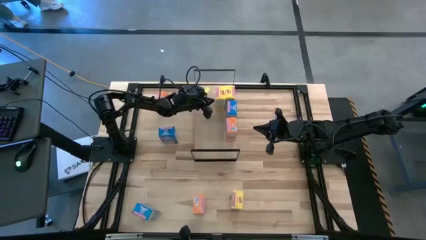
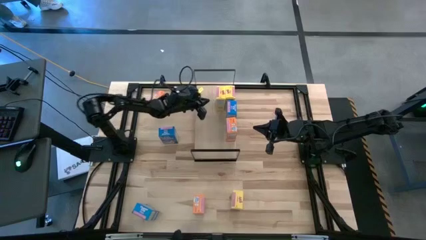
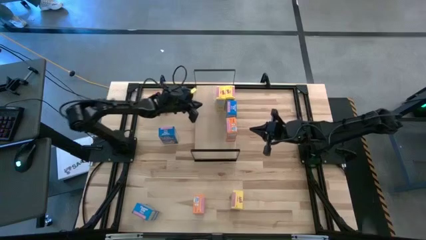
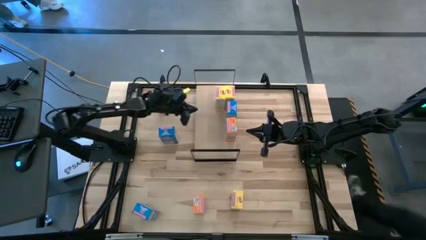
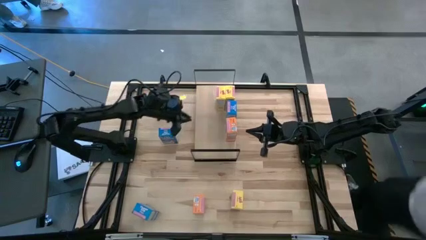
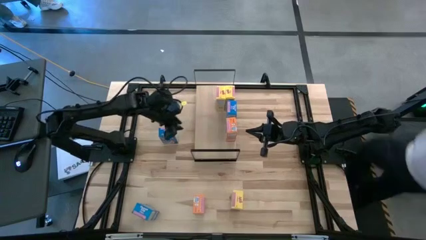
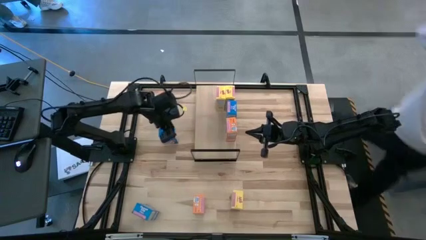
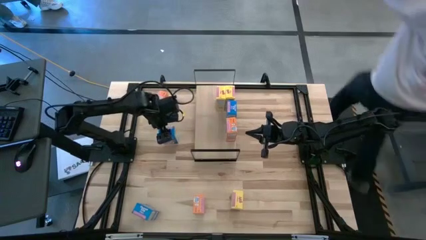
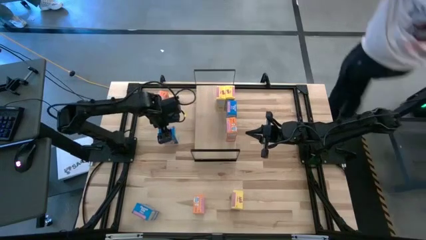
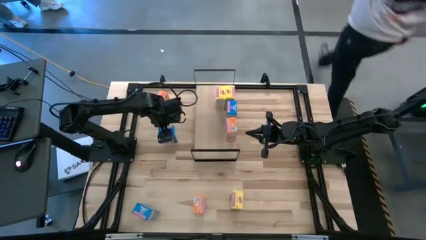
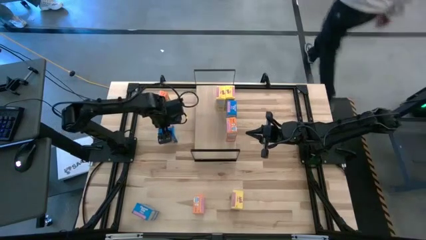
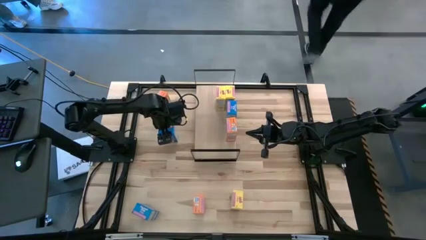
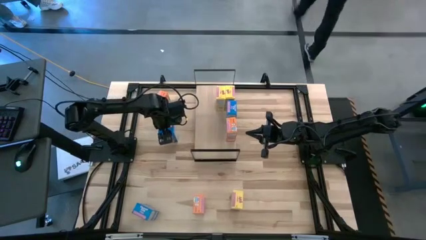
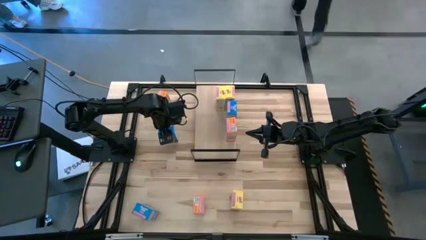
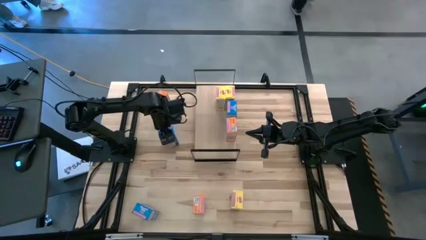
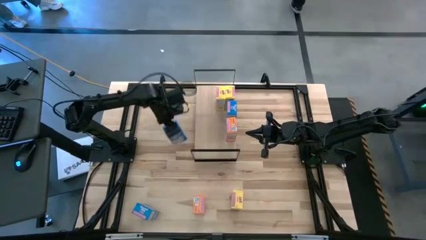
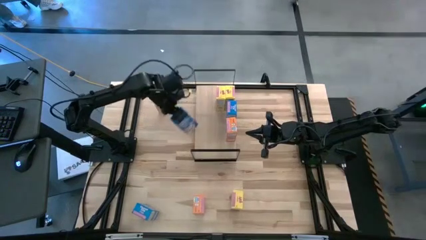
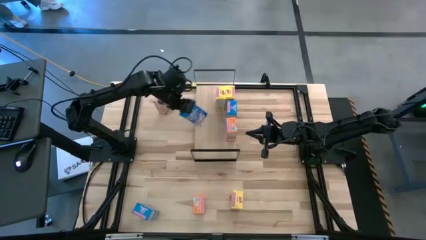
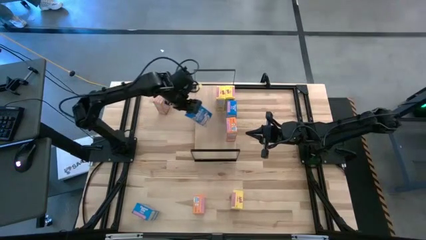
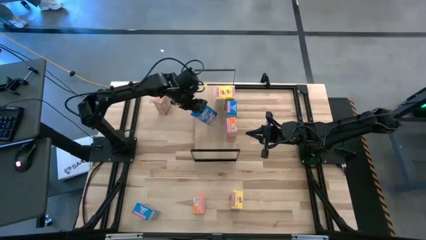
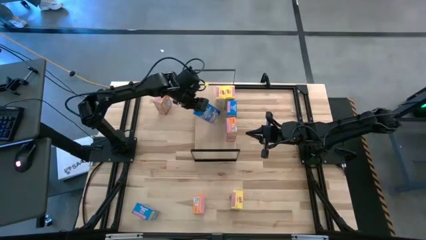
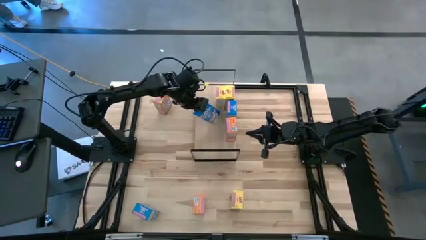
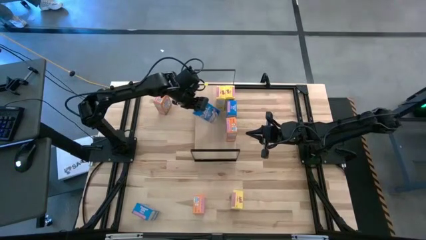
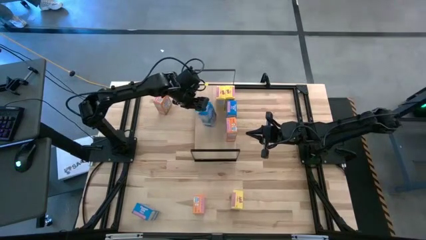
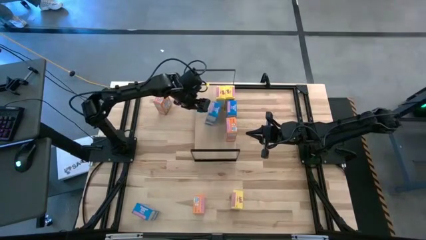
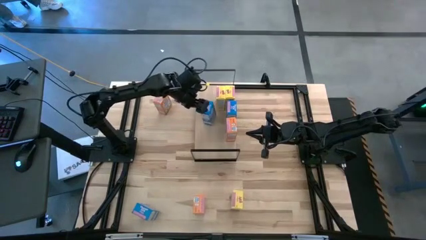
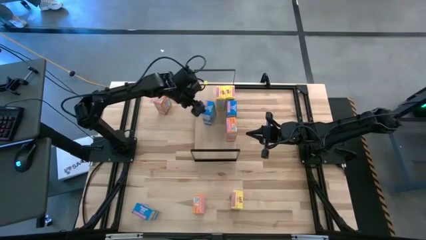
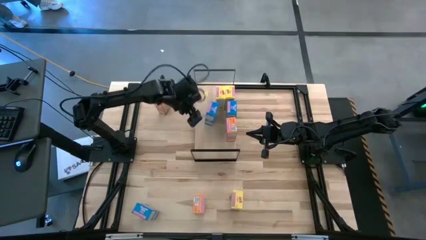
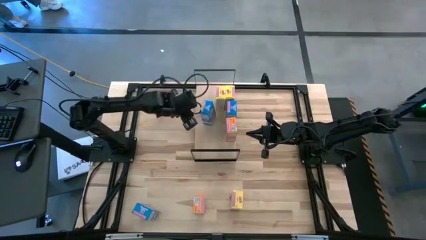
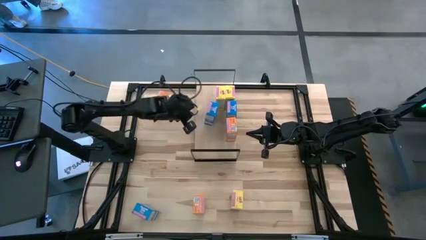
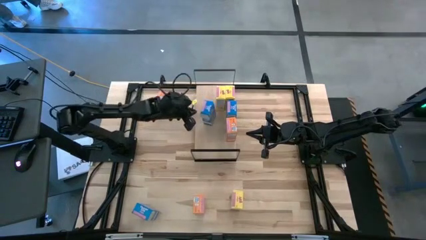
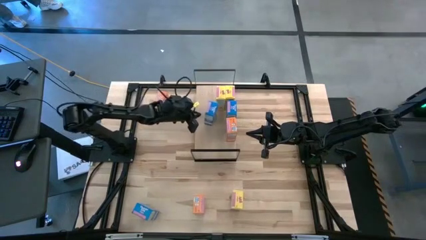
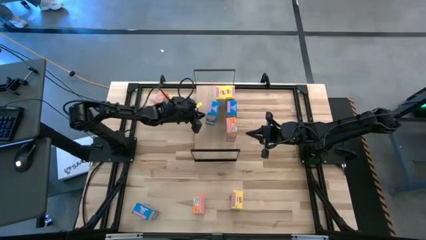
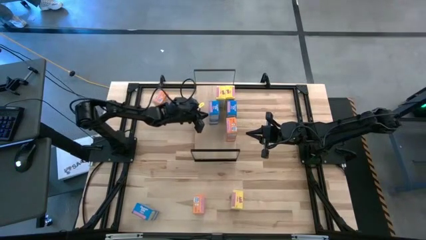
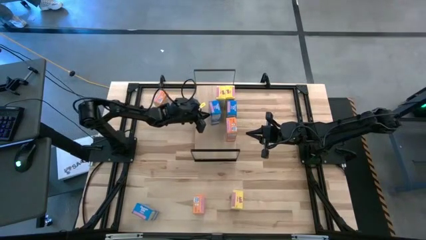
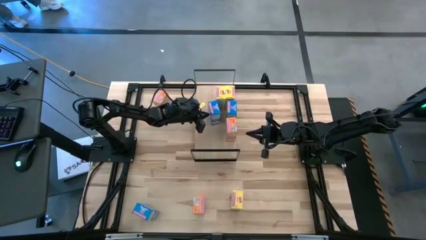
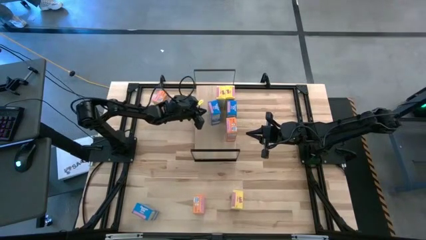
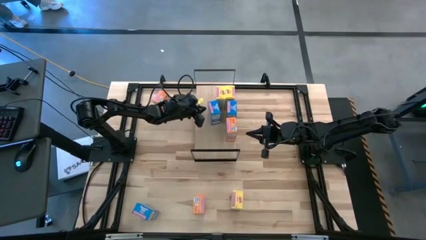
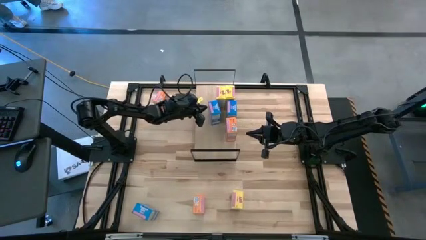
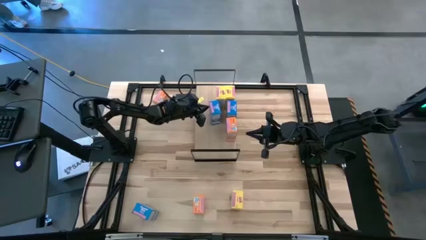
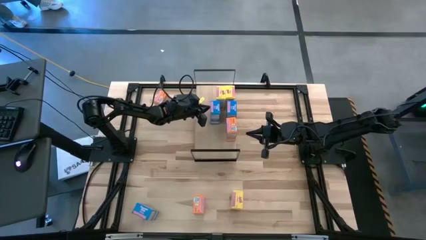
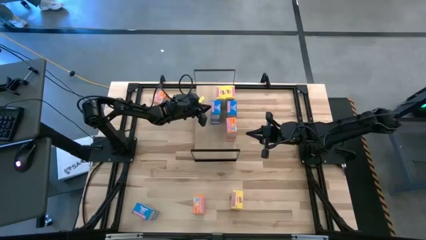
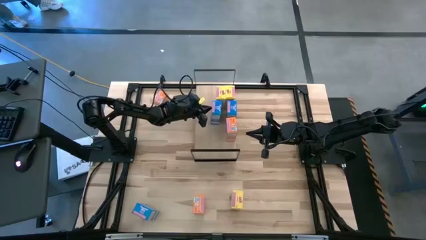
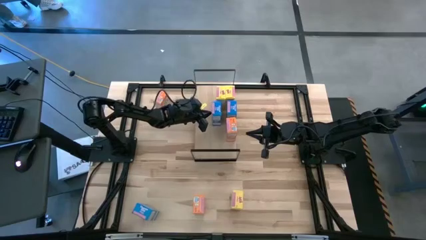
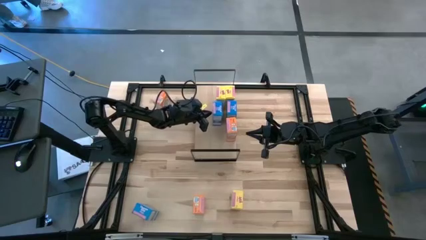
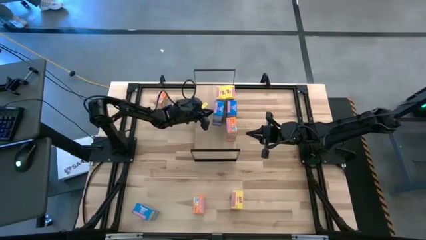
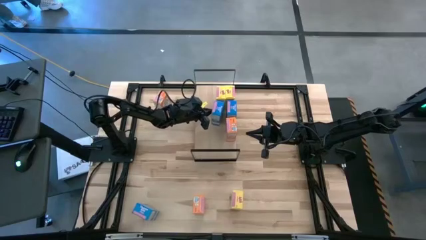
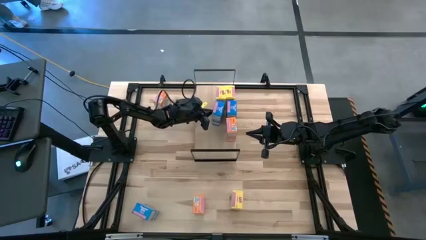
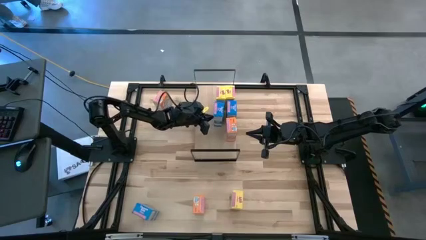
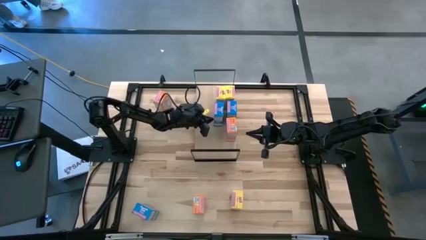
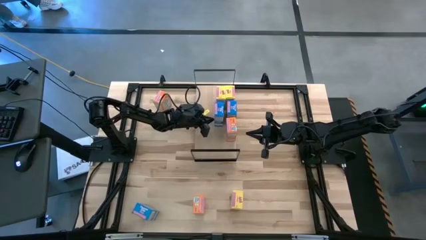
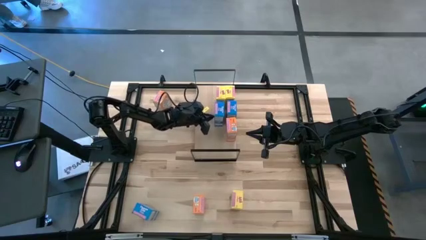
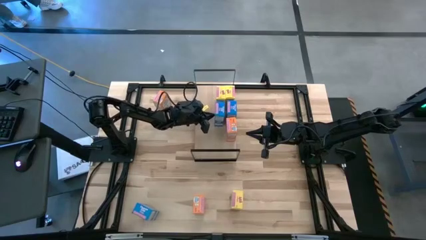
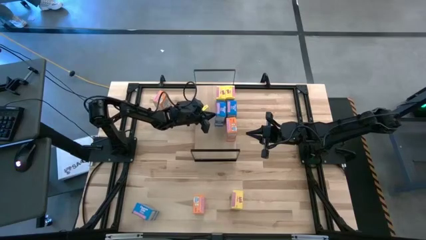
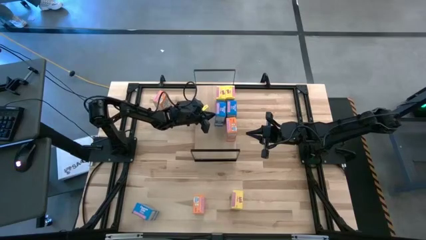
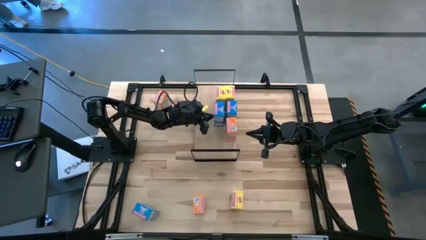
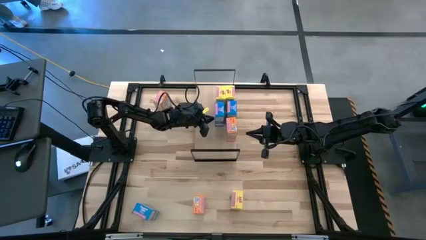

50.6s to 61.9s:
Task: Stack cereal on shelf
Put the top blue cereal box on the shelf aligned with the other blue cereal box on the shelf

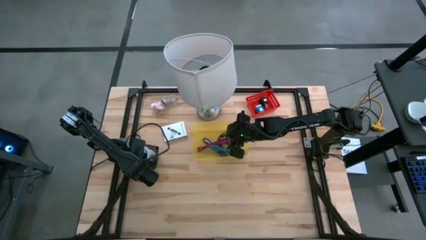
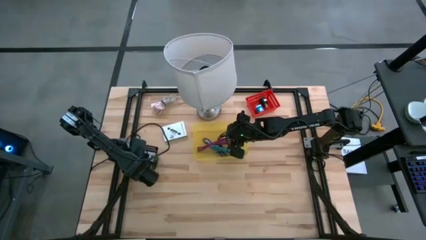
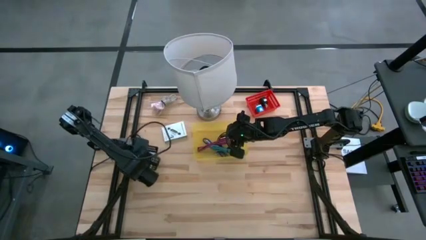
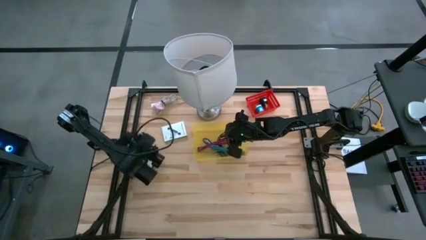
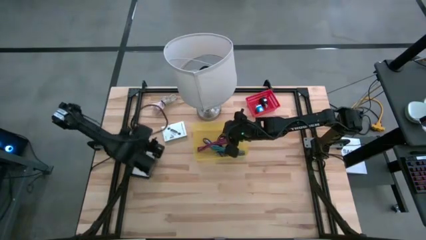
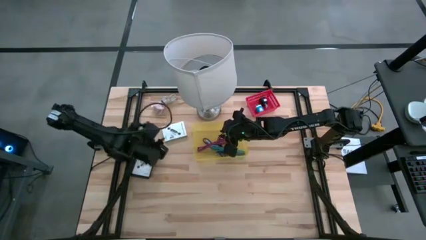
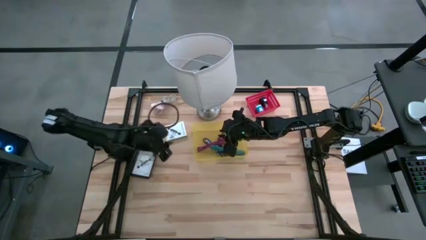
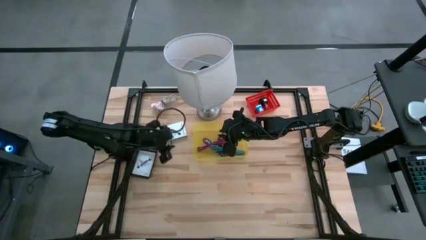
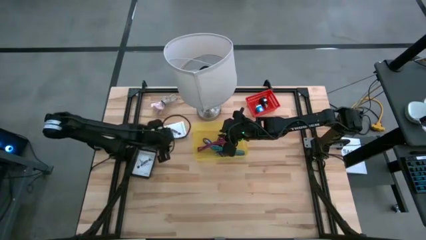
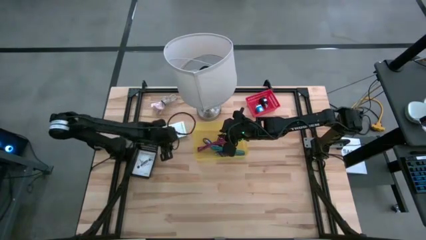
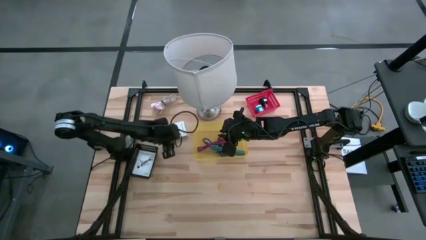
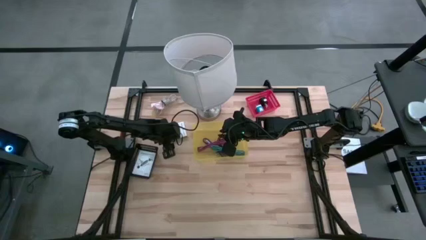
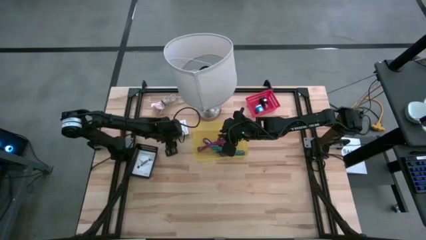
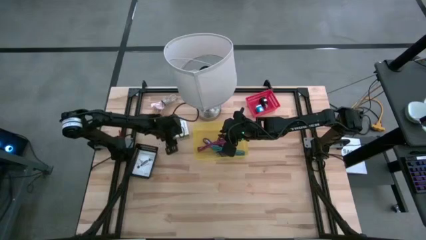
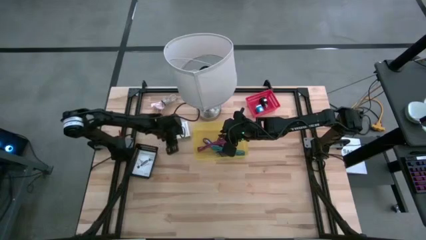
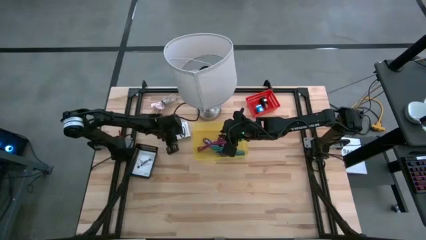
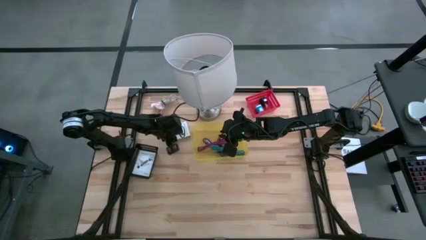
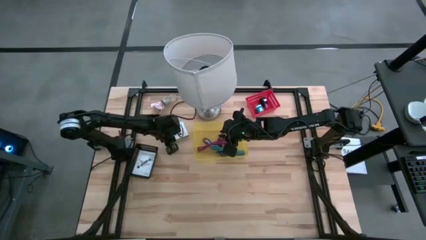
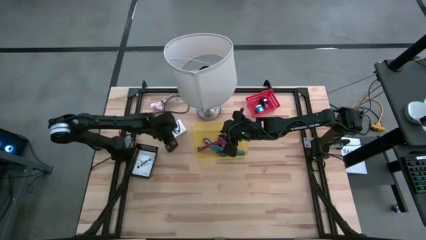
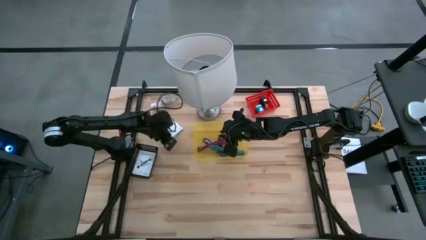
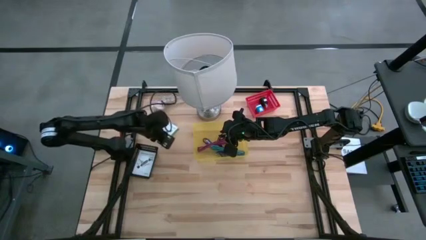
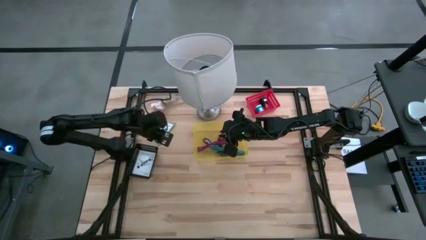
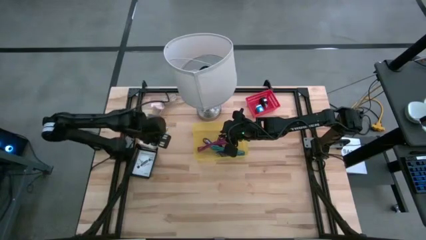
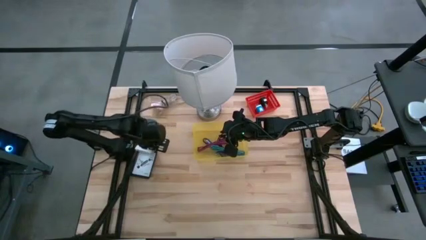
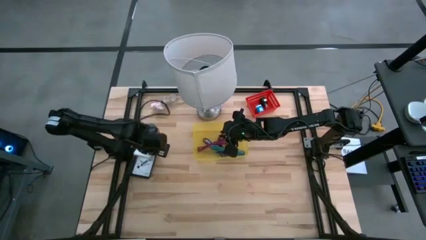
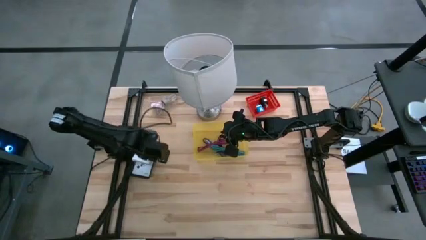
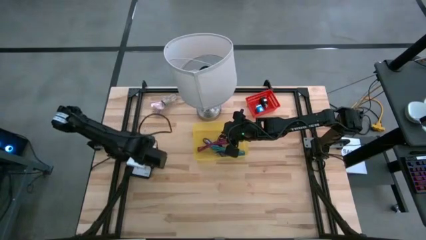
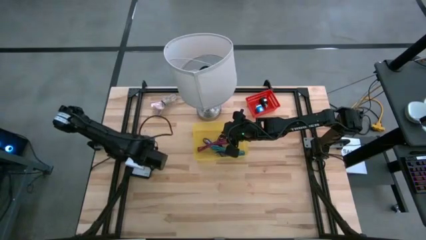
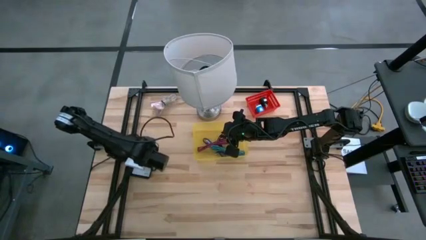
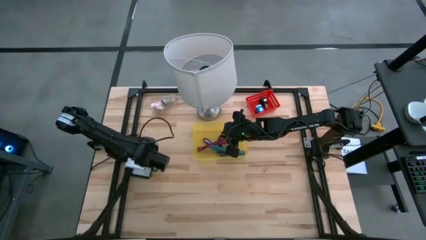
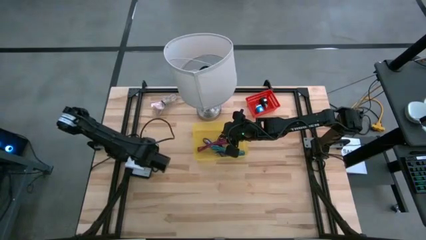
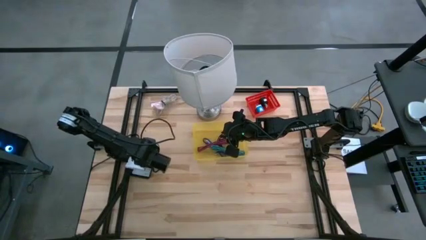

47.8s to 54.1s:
Task: Pick and place items into bin
Put the white card reader box into the black bin
